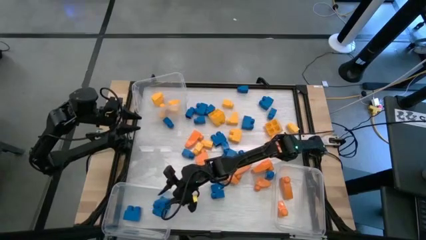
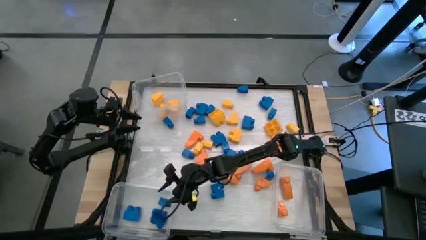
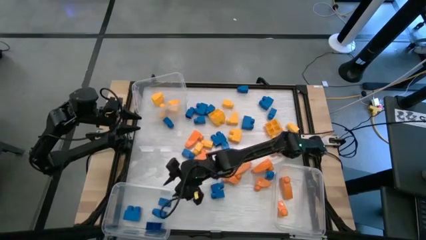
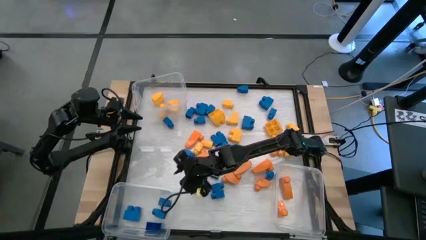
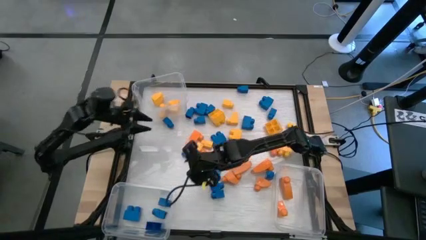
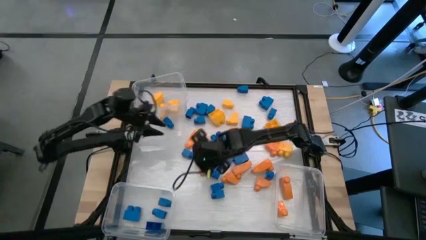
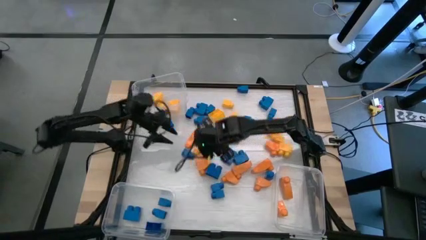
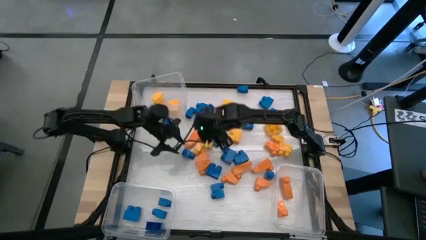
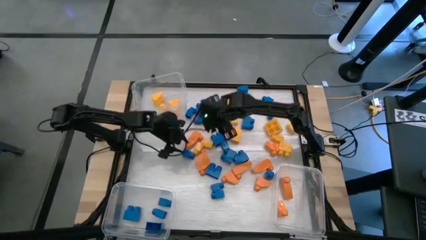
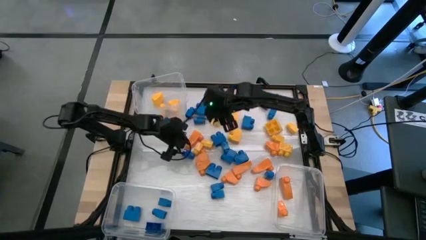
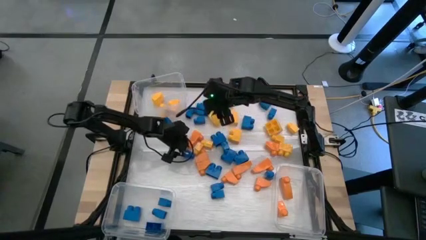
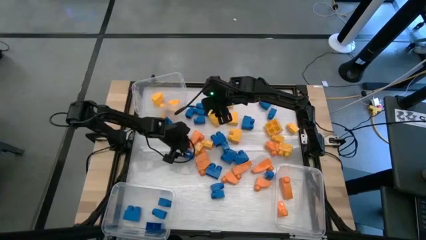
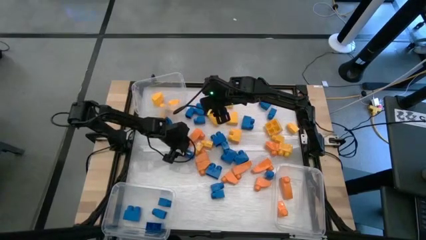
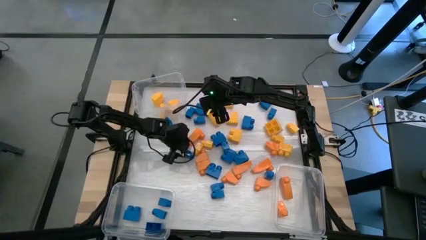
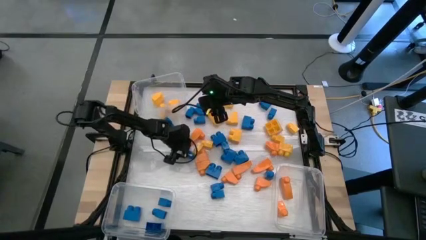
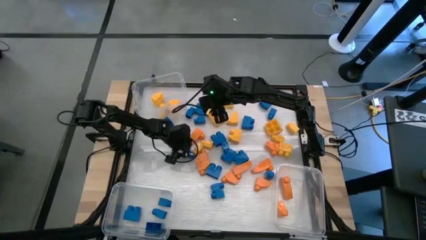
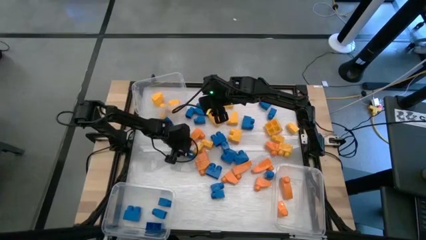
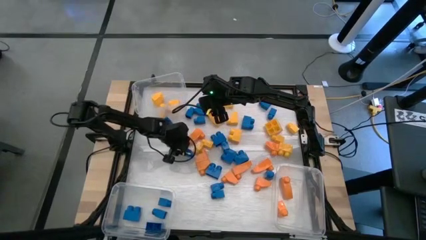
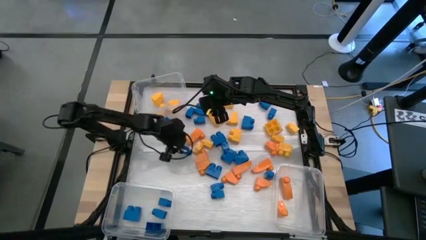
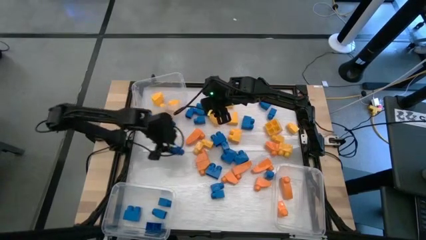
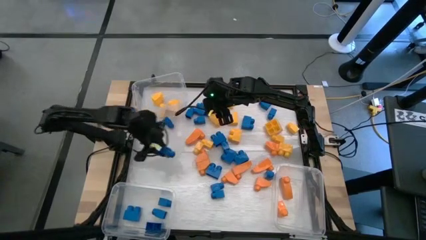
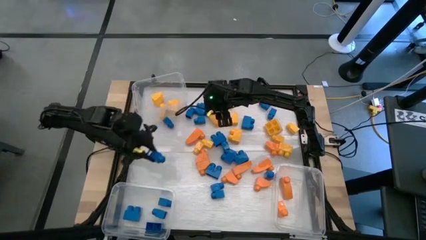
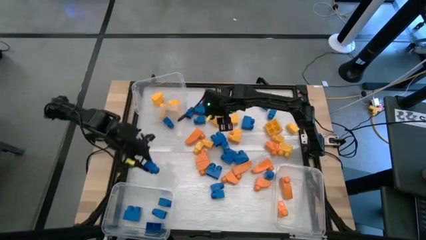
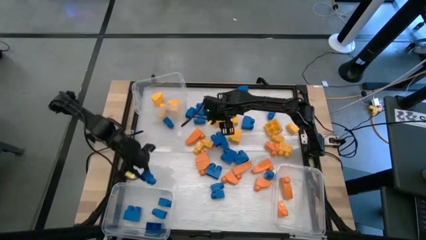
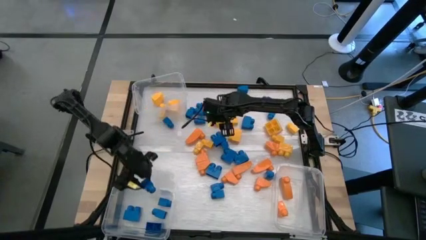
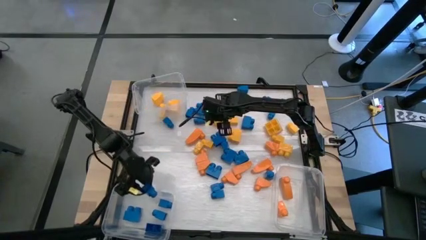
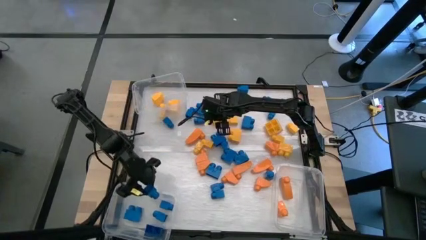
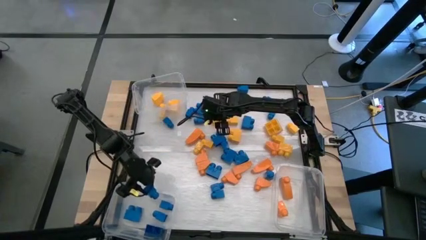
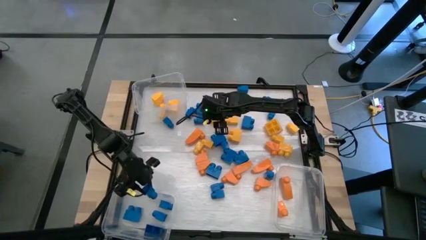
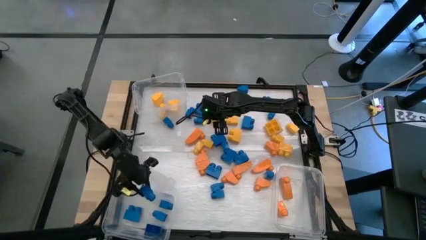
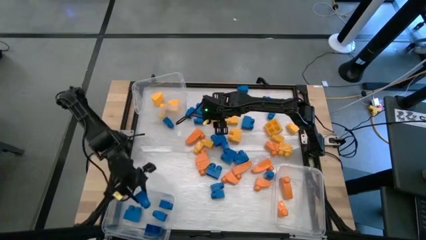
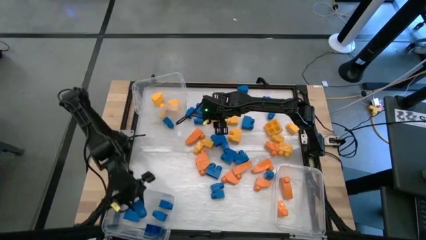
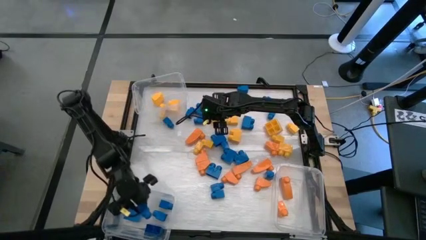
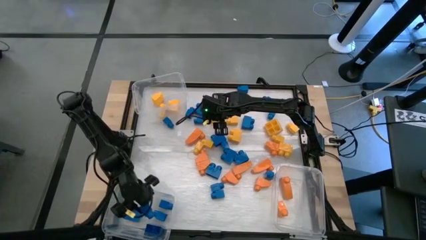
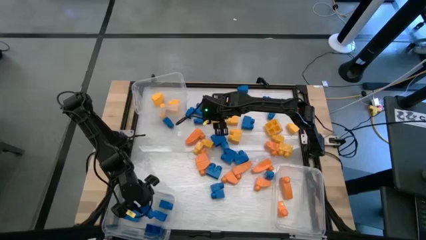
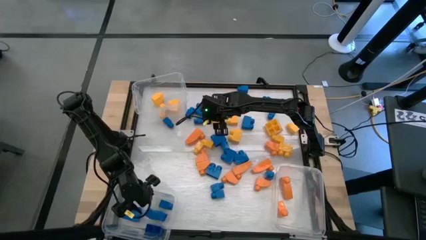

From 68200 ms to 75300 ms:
Task: Sort blocks
Put the blue game piece into the bottom left transparent bin

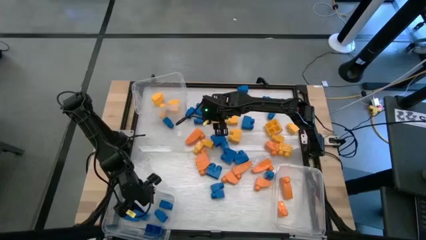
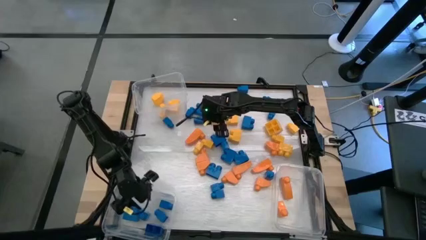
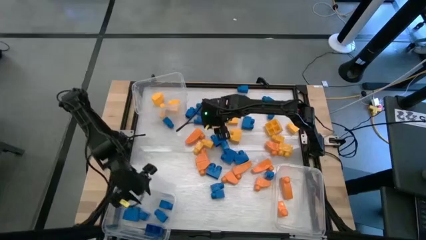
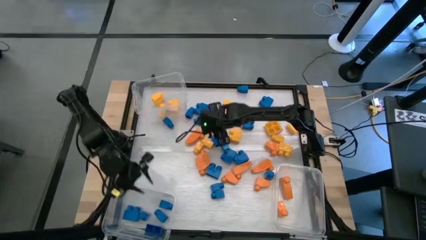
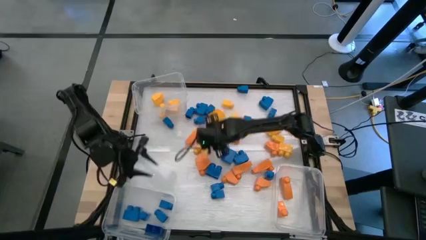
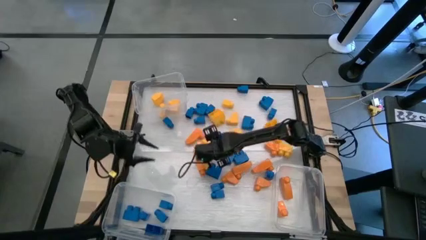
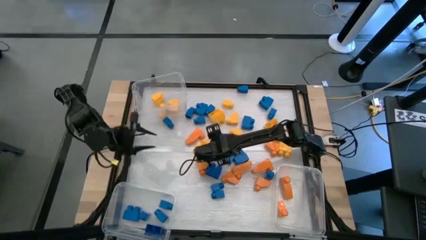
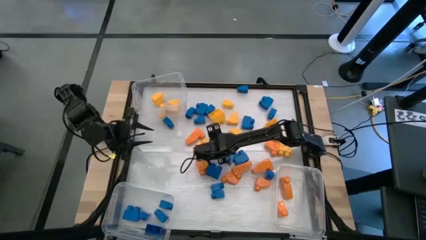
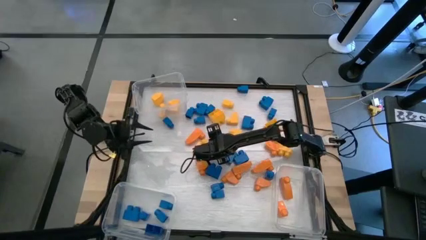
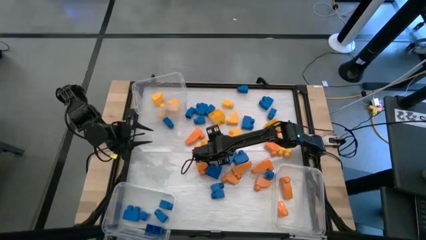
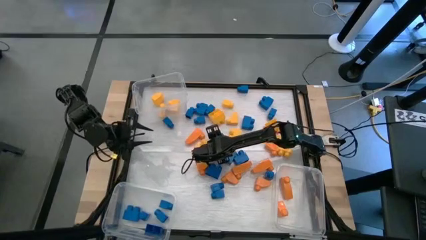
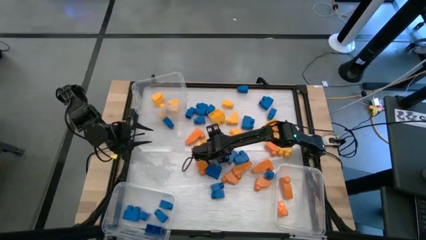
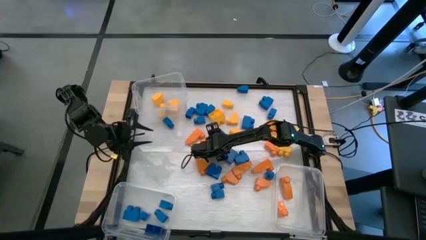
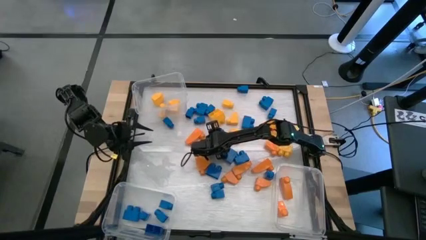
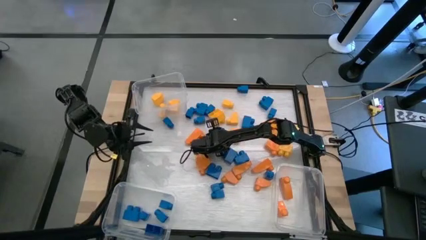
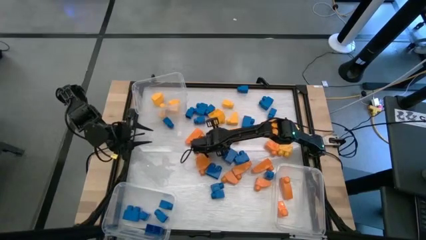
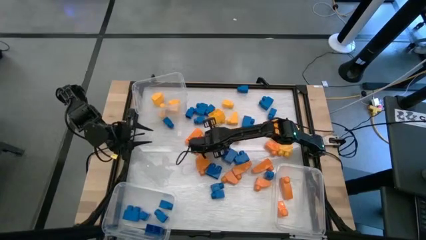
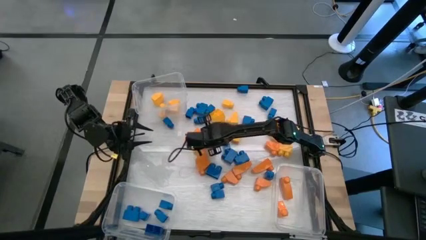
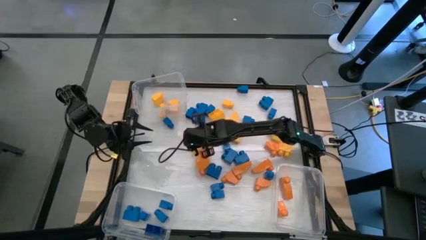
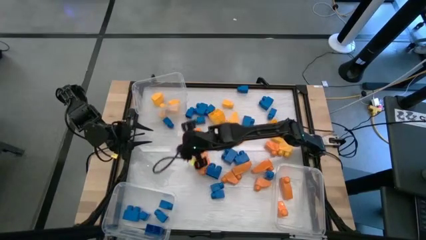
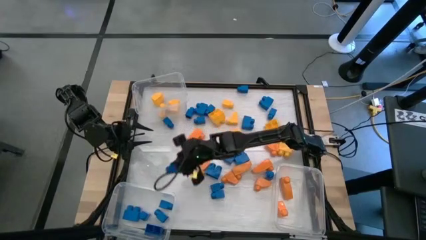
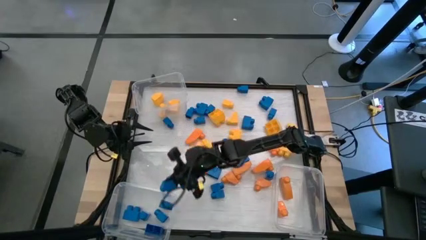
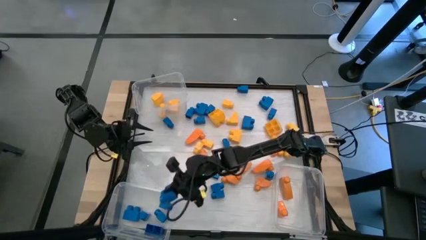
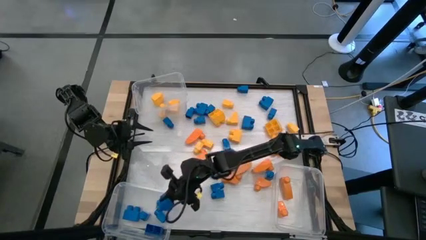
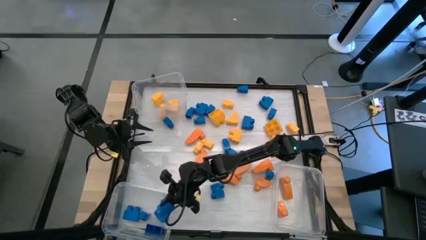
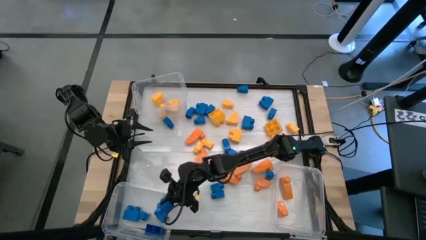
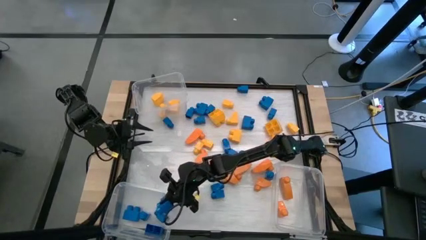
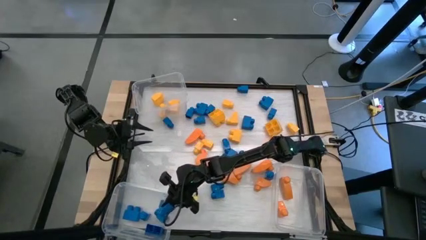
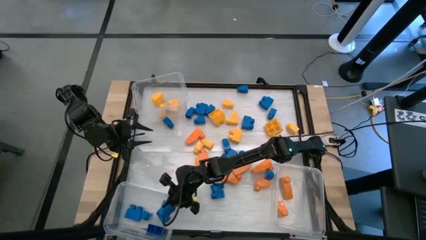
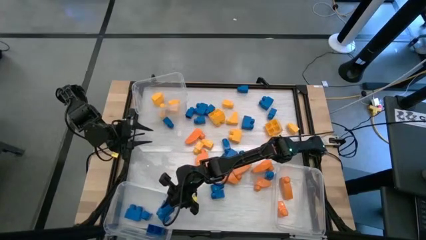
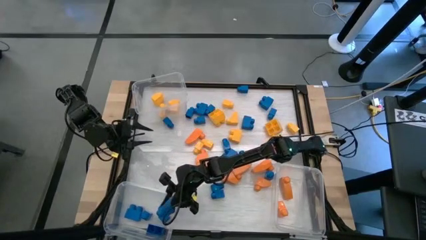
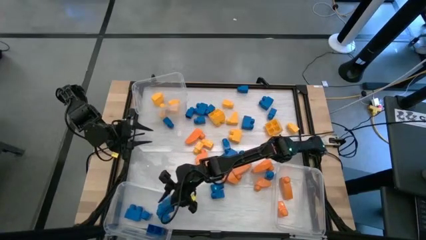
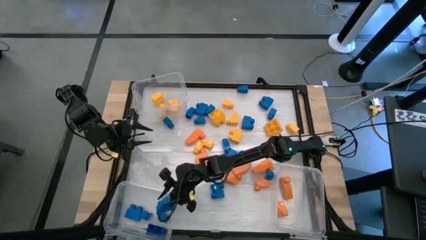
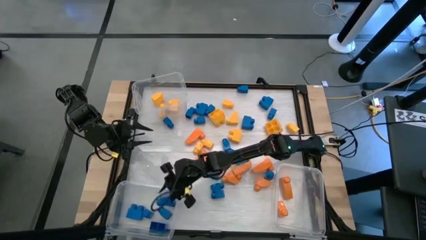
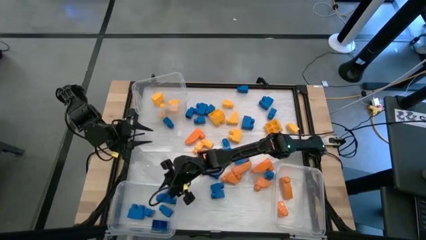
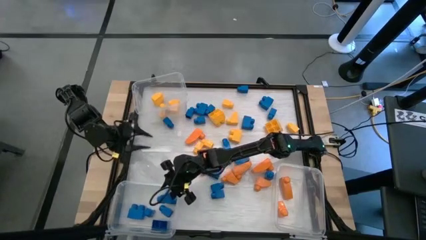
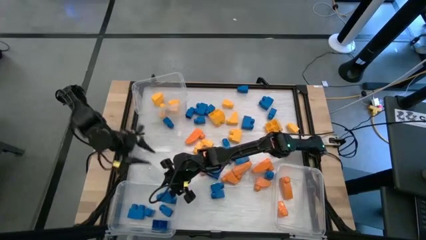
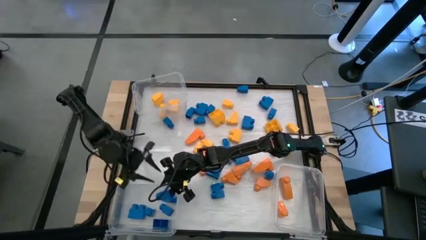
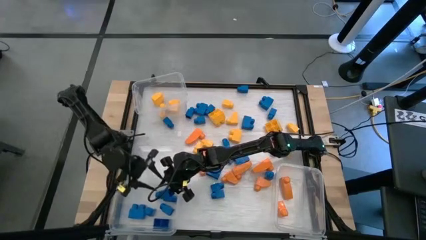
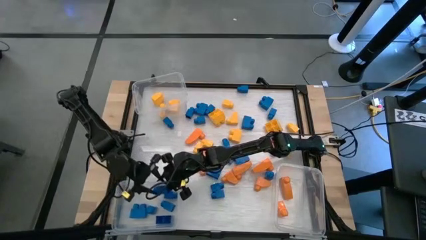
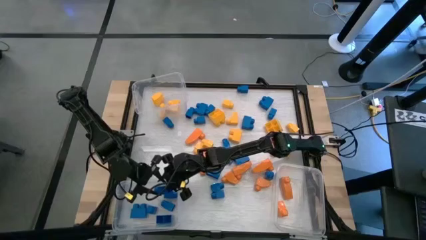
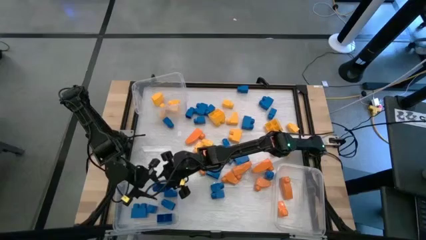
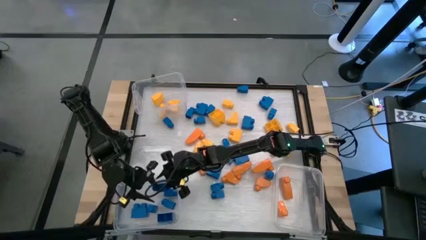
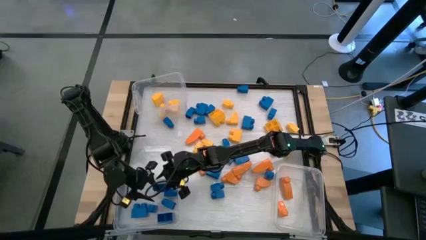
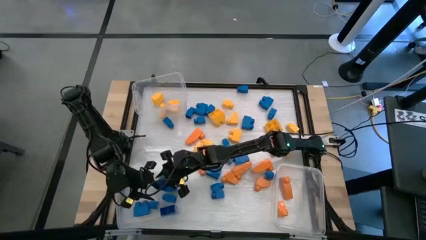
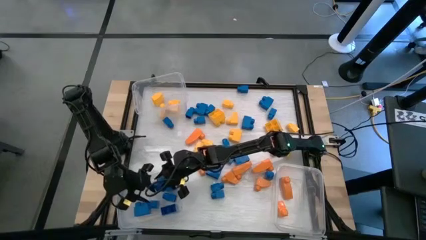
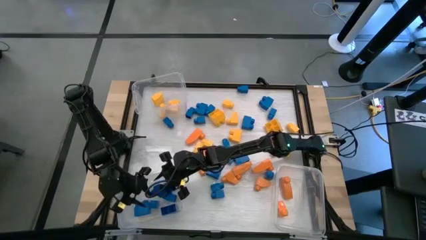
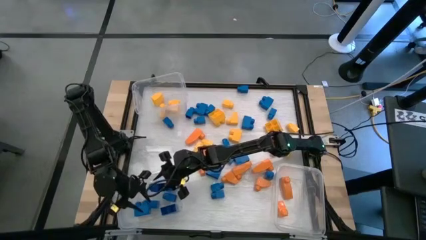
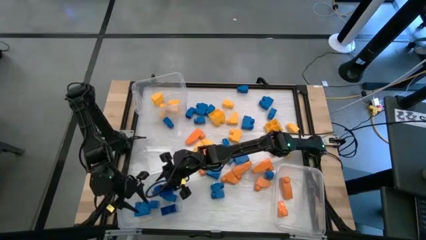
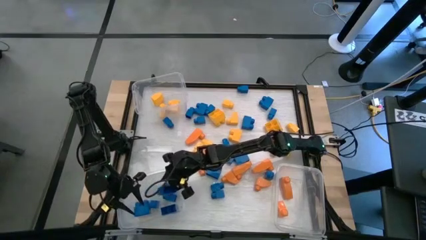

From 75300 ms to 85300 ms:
Put the blue game piece into the bottom left transparent bin
